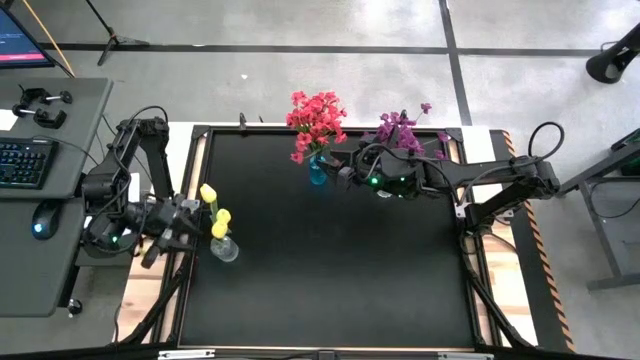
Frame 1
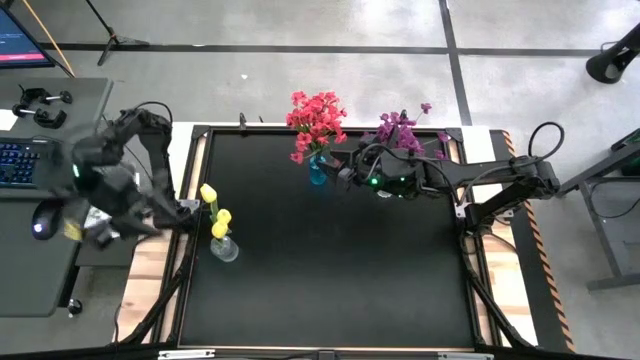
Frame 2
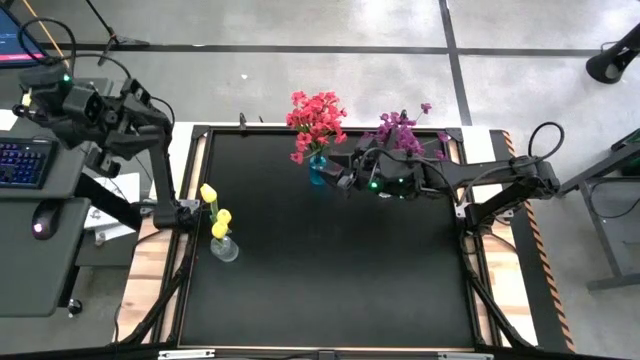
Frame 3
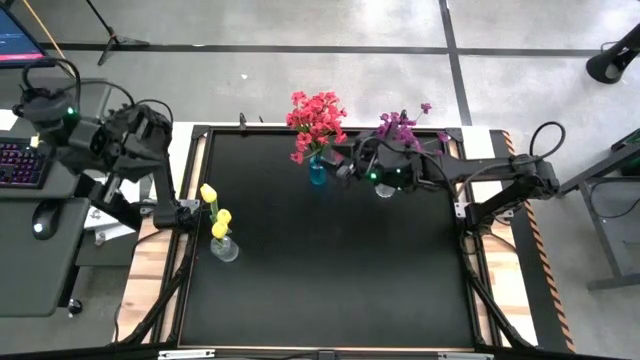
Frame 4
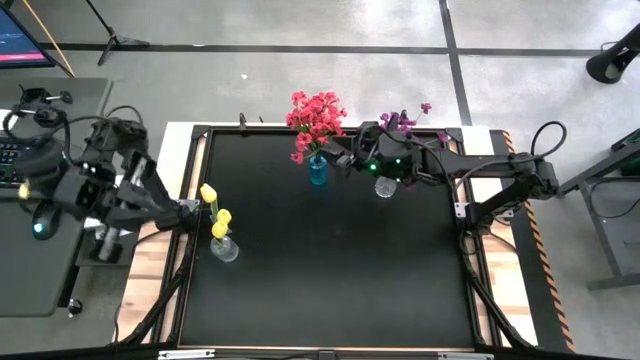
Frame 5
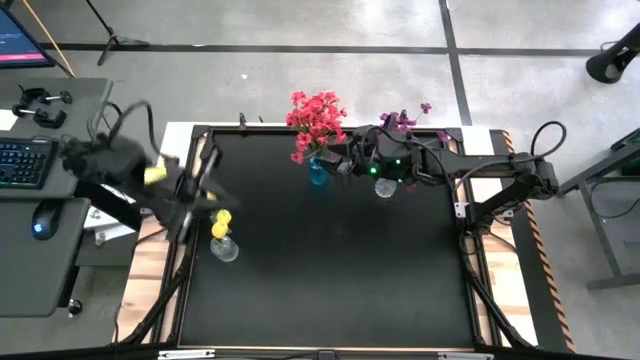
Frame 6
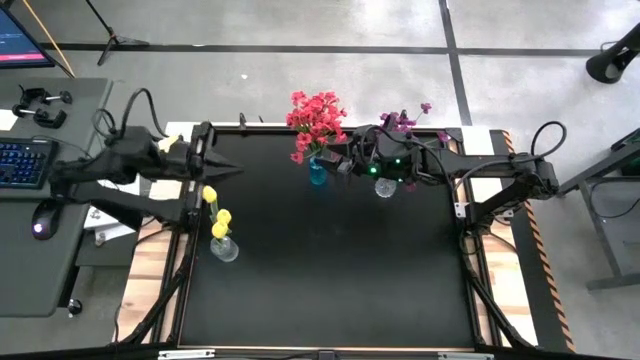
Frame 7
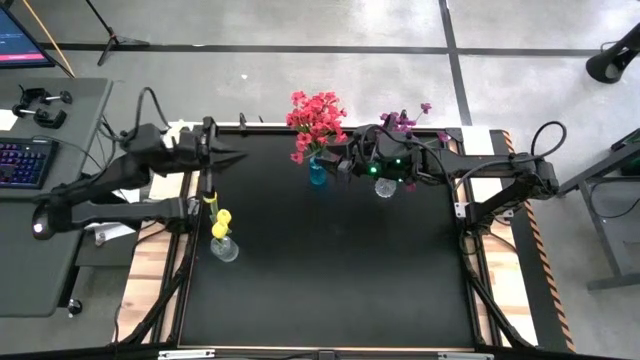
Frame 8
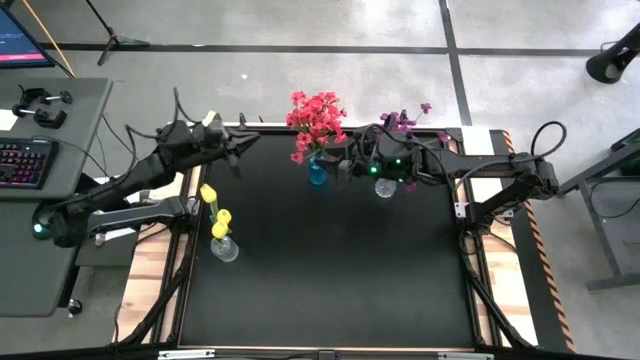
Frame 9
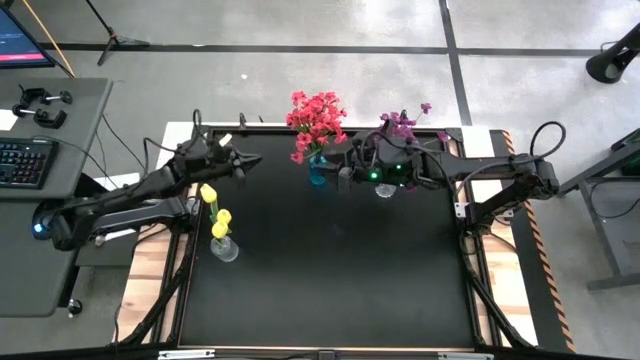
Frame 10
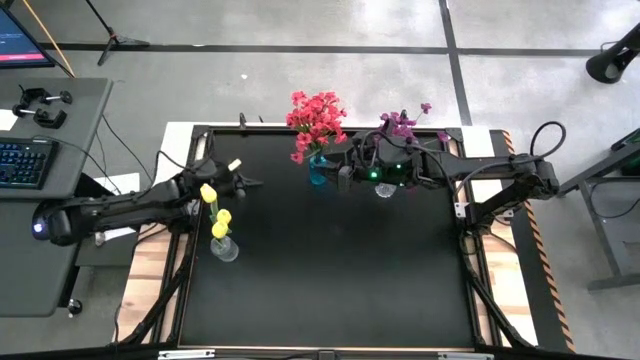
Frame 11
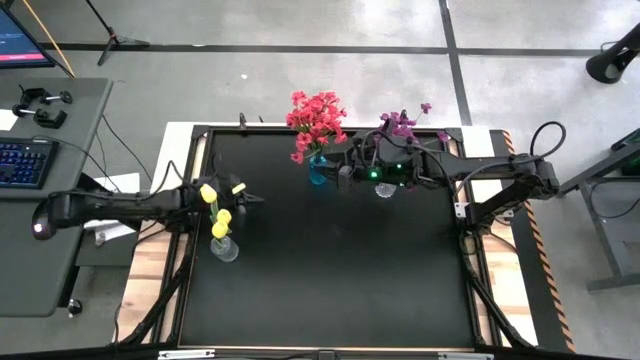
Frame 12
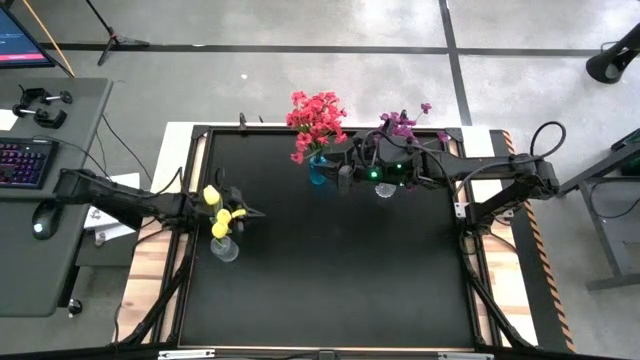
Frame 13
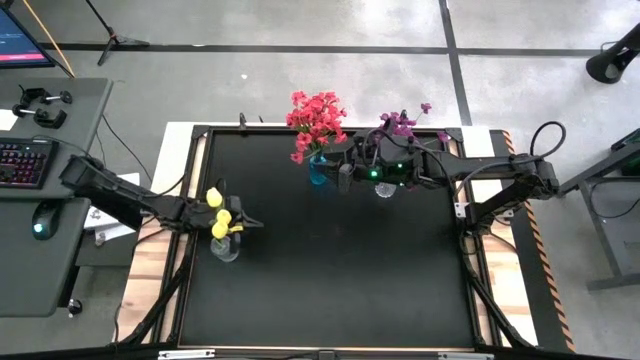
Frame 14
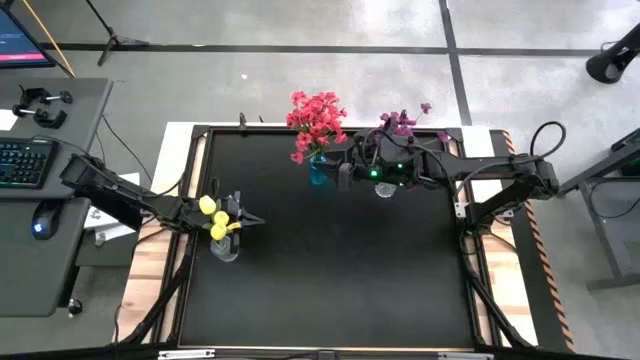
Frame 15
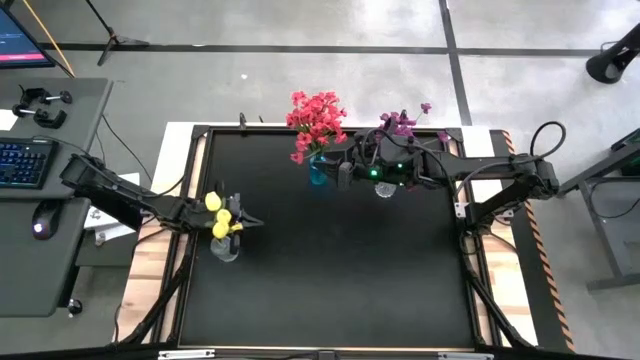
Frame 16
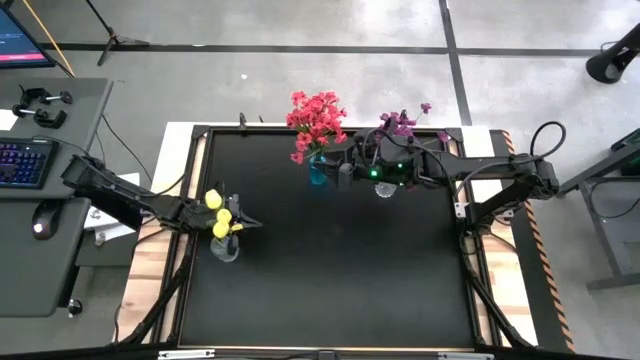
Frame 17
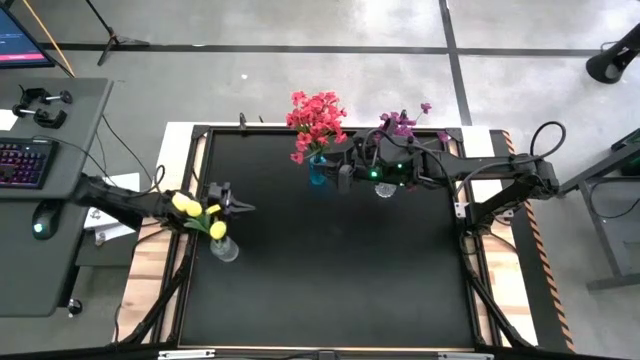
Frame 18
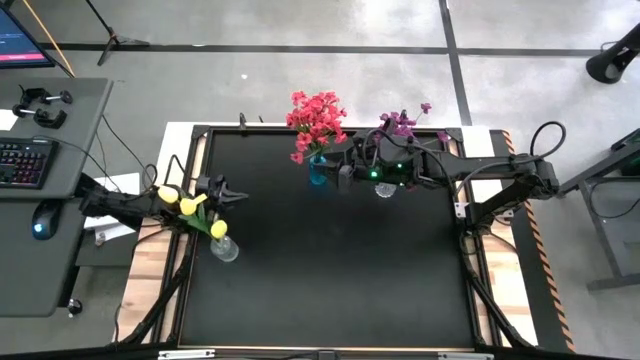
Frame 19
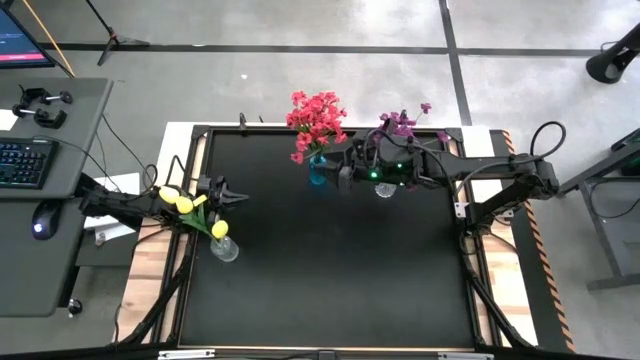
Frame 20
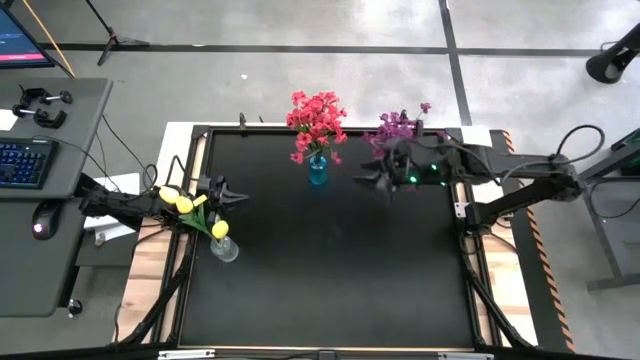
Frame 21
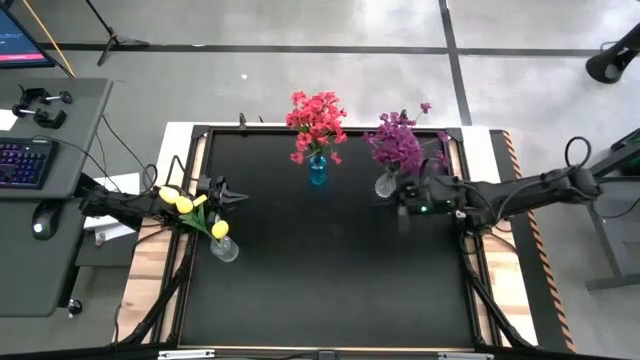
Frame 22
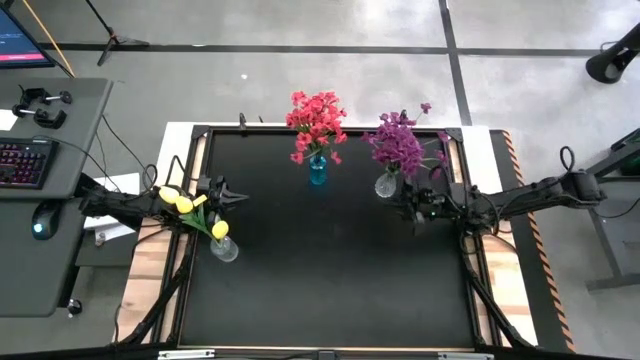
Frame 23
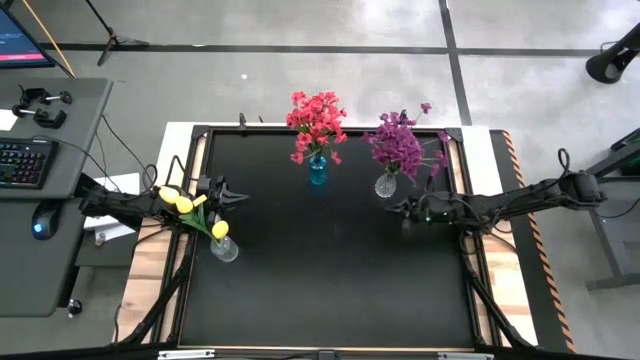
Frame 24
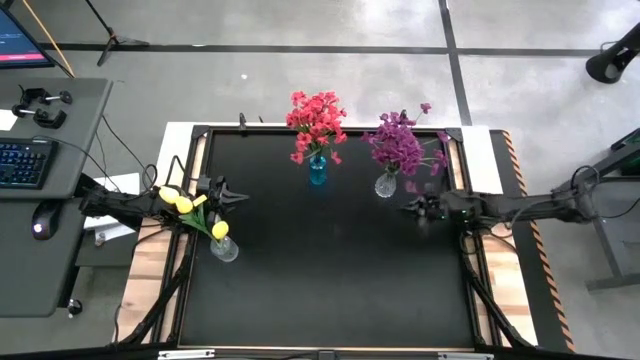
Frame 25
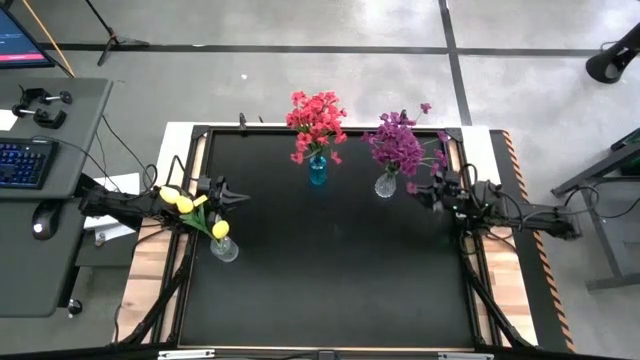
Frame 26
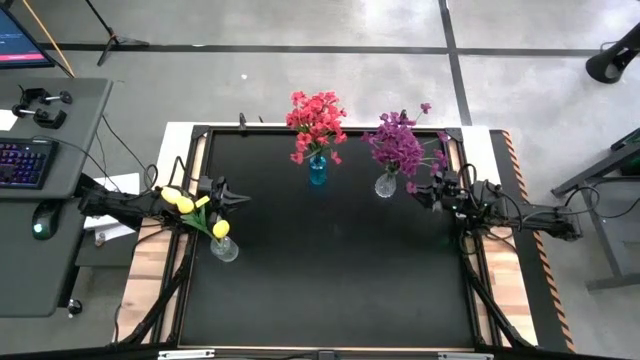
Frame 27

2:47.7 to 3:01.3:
Task: Sort flowers into vase by color
Return to Home Position

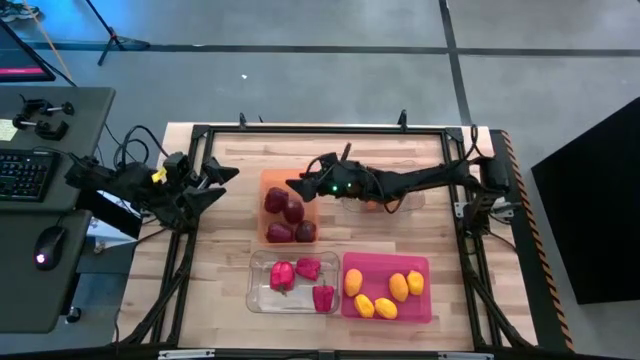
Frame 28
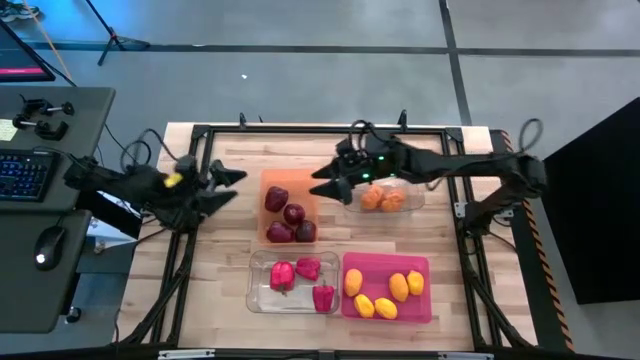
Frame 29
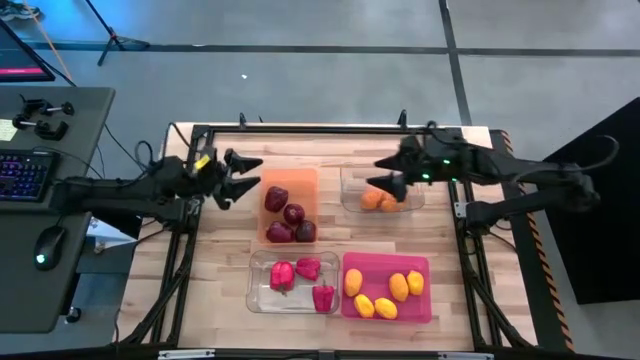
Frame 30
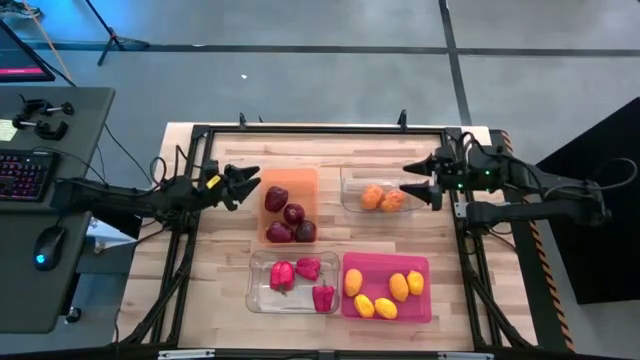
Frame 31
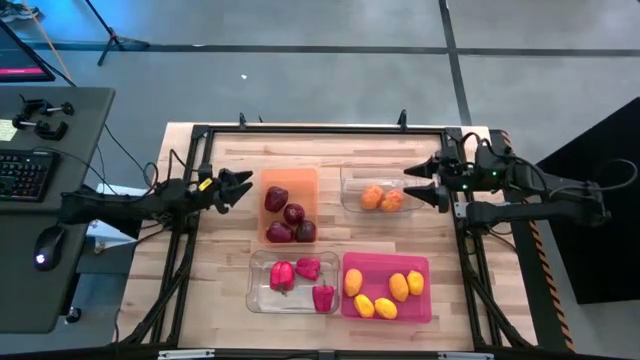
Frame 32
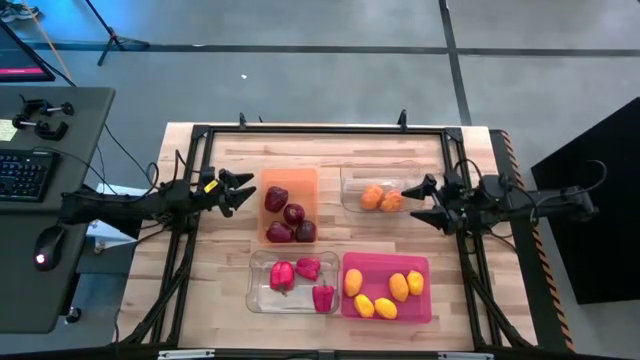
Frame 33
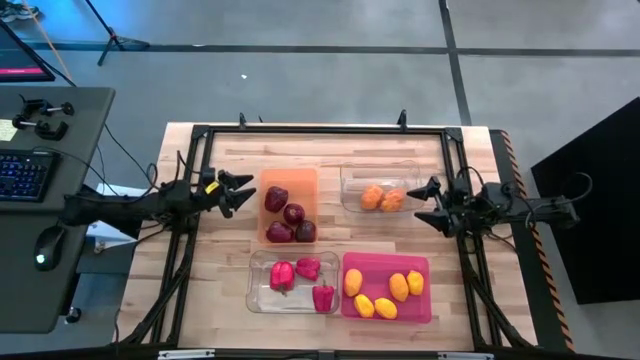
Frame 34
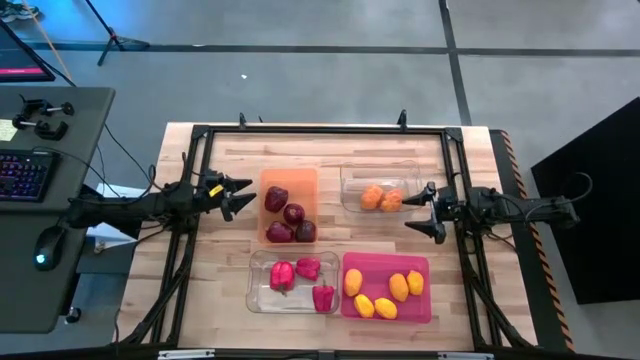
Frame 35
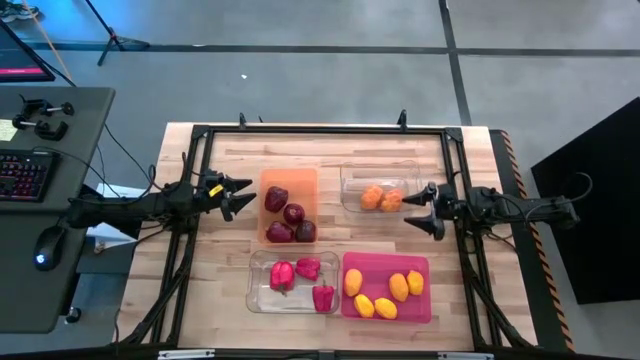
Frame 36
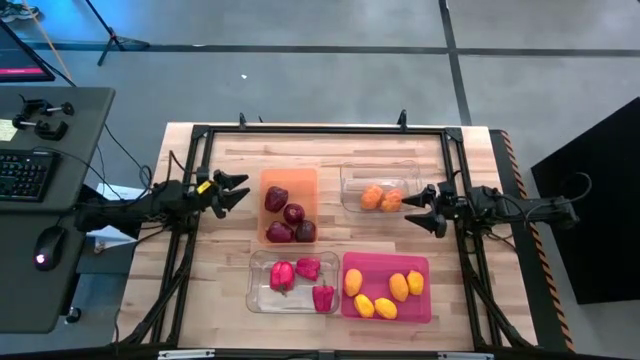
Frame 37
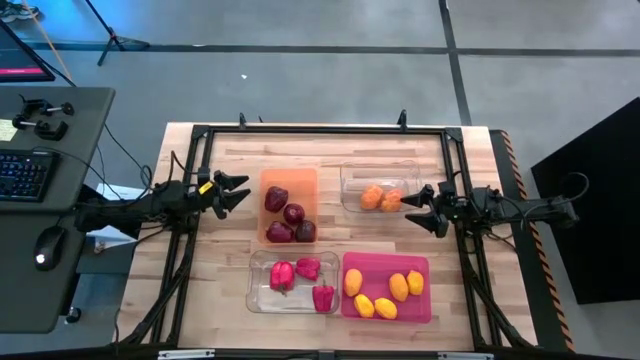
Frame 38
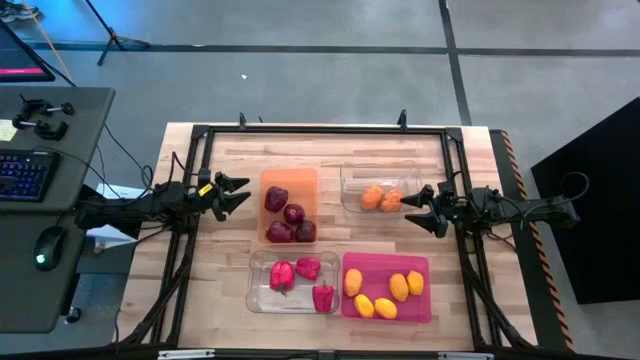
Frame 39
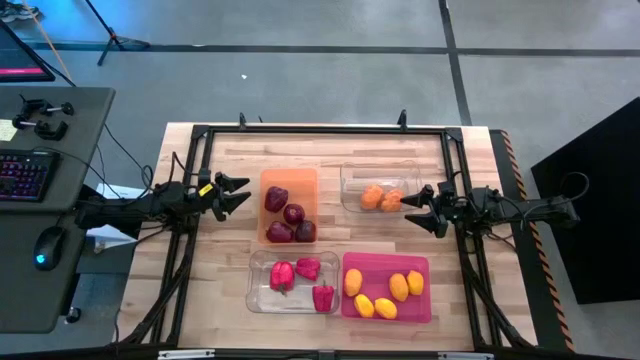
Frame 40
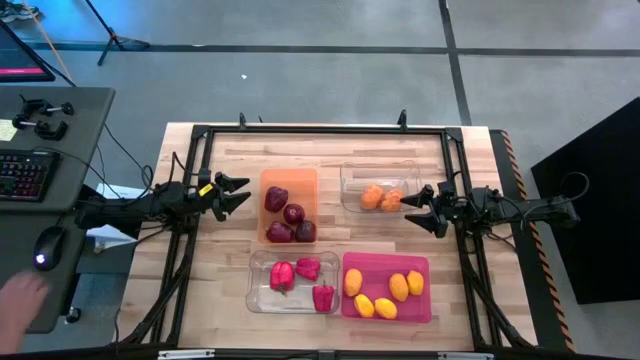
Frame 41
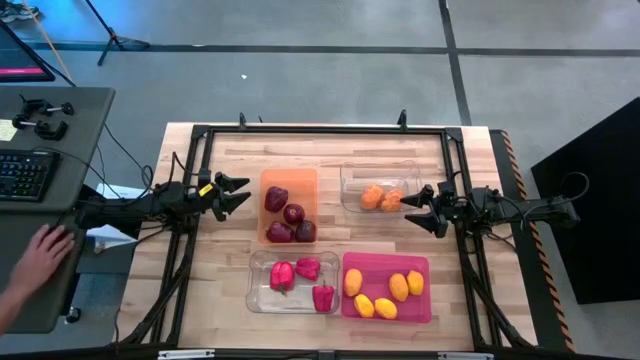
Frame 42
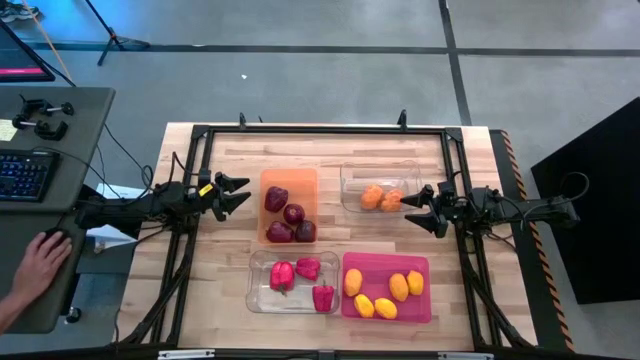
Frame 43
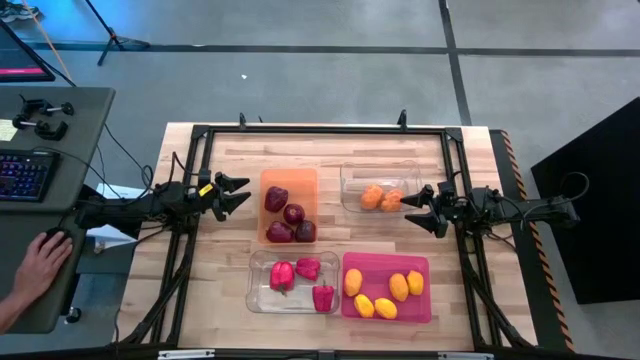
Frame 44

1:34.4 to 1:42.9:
Task: Sort produce into baskets
Return to Home Position
